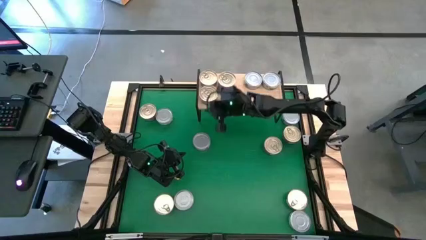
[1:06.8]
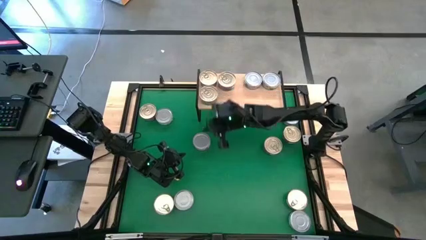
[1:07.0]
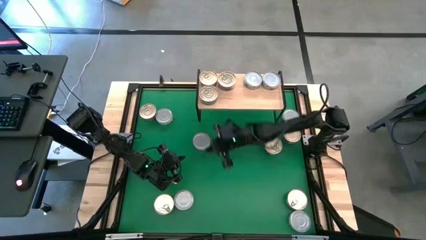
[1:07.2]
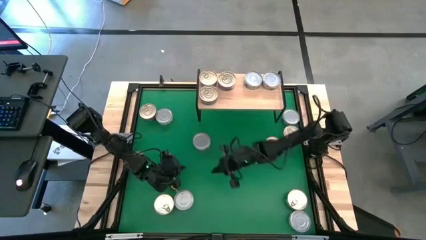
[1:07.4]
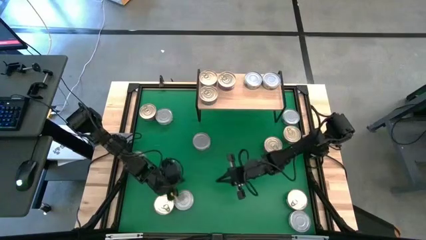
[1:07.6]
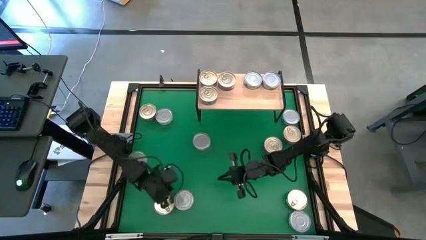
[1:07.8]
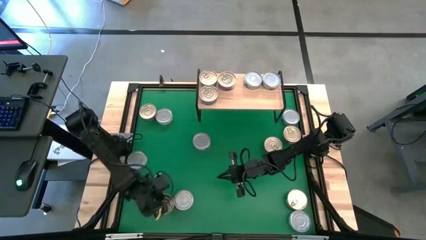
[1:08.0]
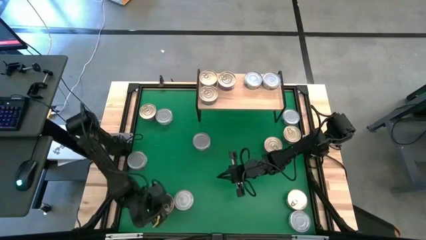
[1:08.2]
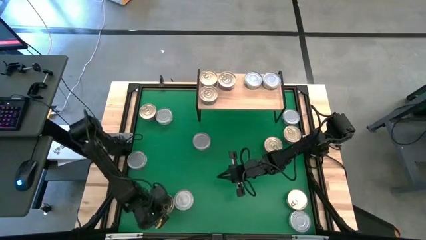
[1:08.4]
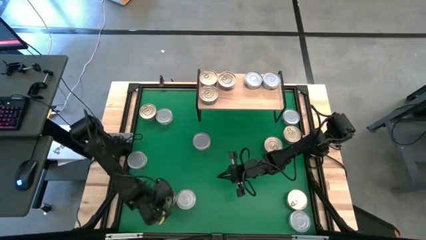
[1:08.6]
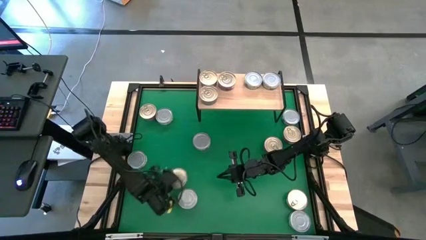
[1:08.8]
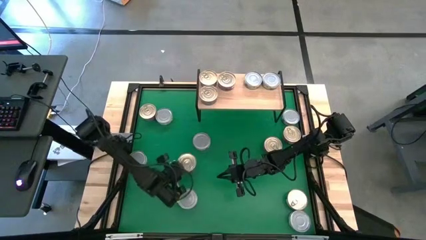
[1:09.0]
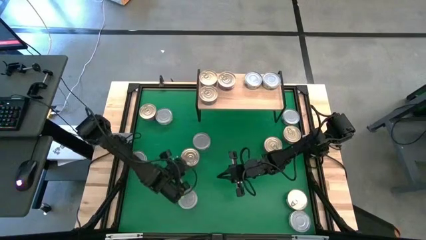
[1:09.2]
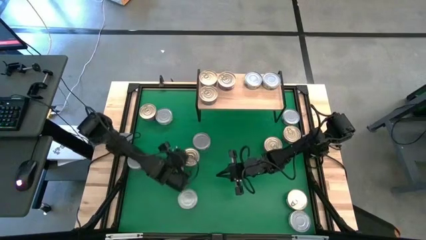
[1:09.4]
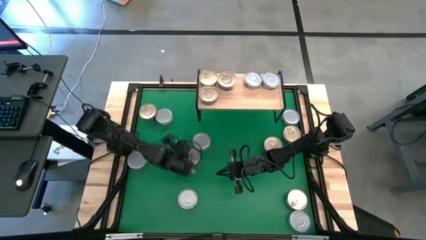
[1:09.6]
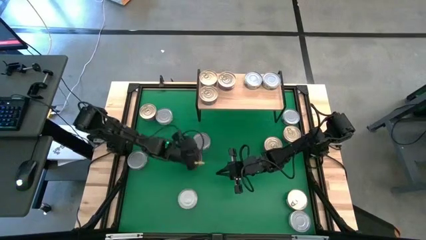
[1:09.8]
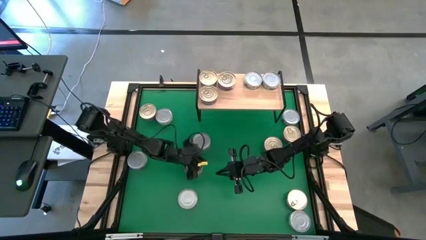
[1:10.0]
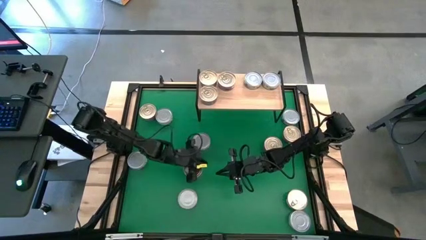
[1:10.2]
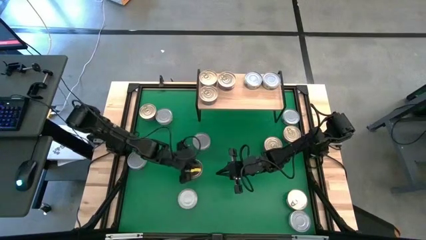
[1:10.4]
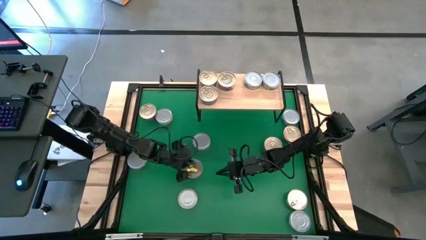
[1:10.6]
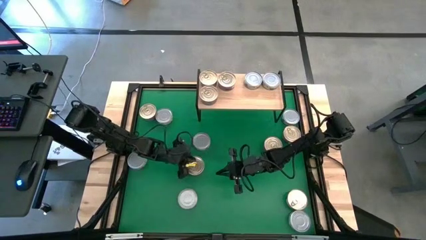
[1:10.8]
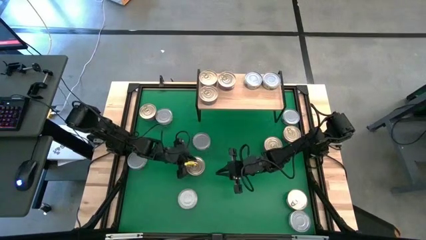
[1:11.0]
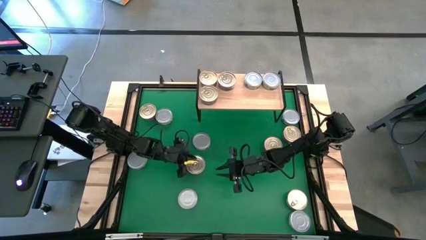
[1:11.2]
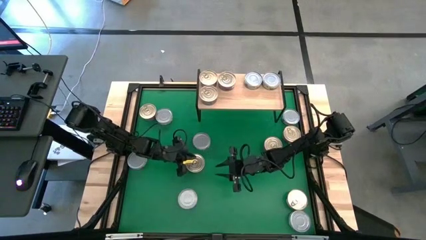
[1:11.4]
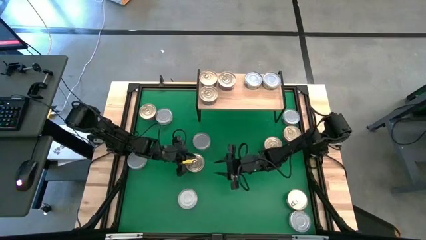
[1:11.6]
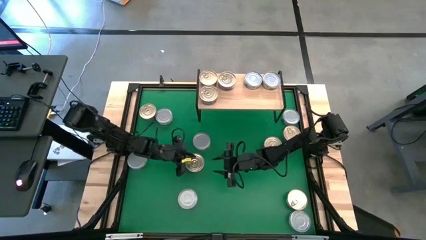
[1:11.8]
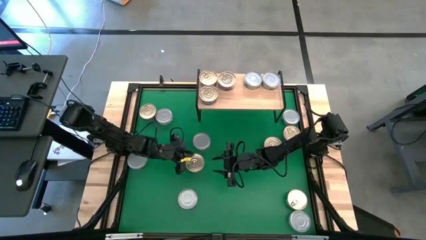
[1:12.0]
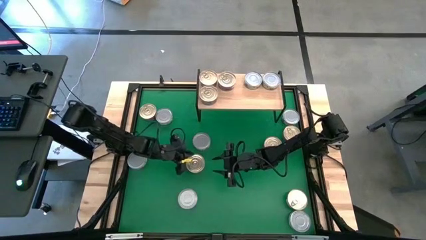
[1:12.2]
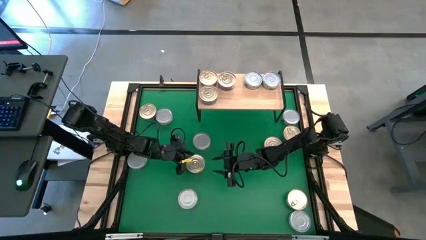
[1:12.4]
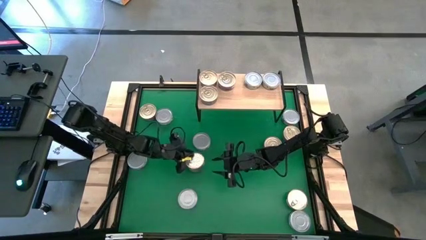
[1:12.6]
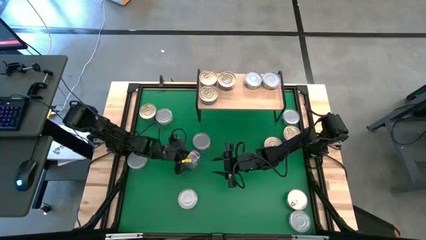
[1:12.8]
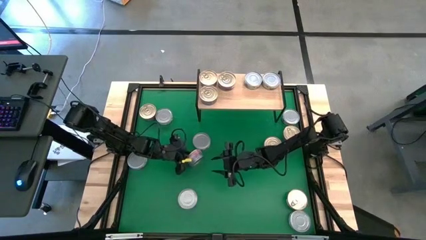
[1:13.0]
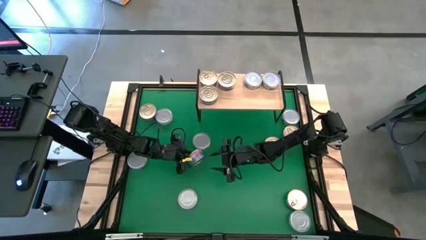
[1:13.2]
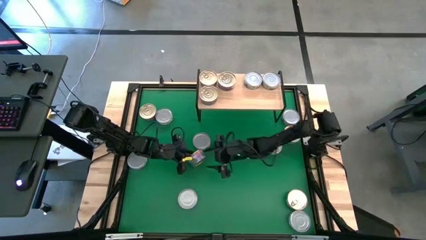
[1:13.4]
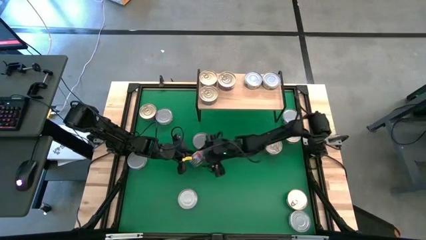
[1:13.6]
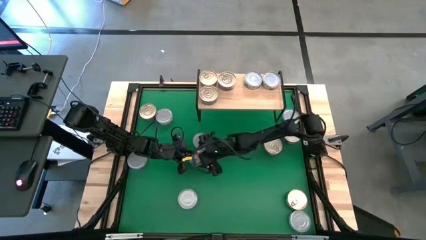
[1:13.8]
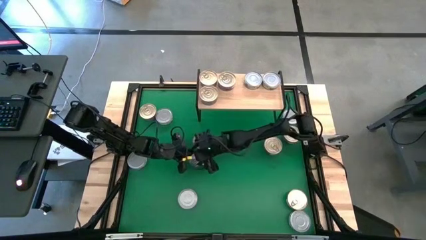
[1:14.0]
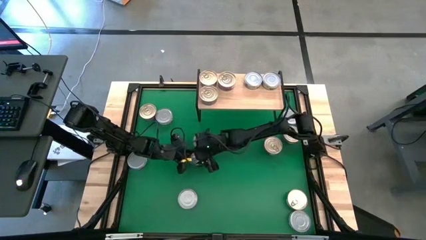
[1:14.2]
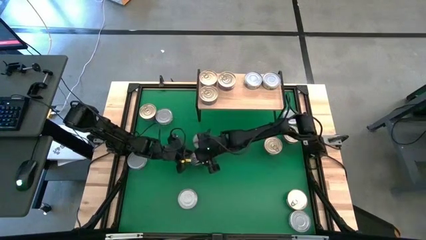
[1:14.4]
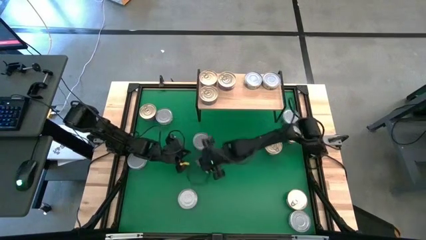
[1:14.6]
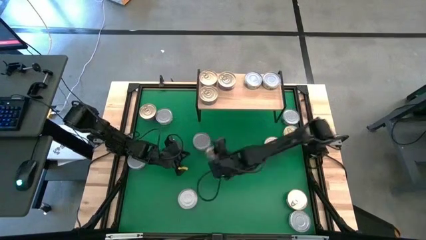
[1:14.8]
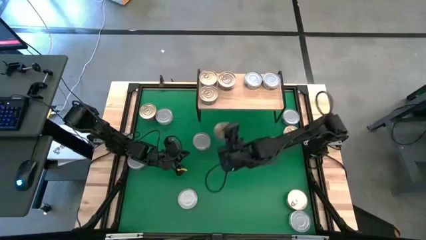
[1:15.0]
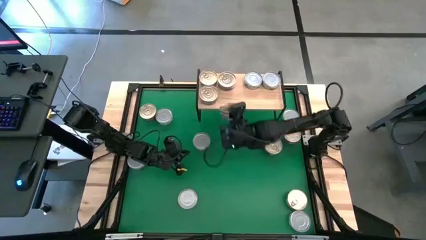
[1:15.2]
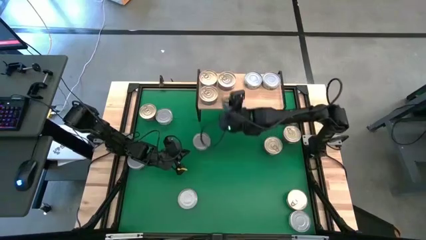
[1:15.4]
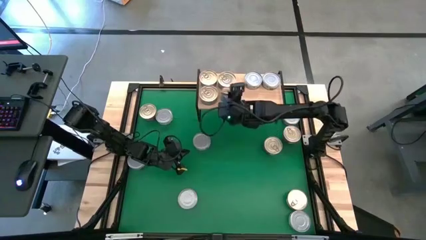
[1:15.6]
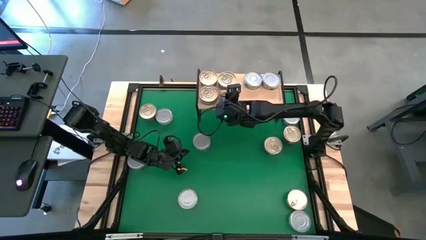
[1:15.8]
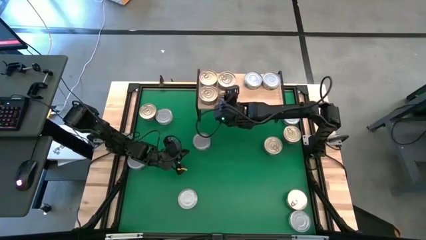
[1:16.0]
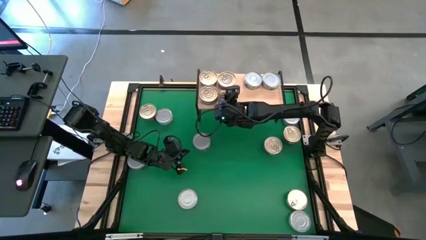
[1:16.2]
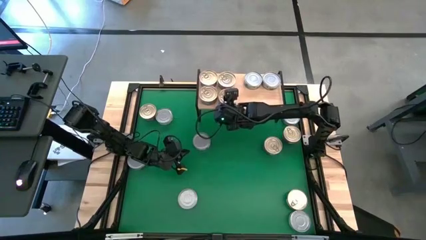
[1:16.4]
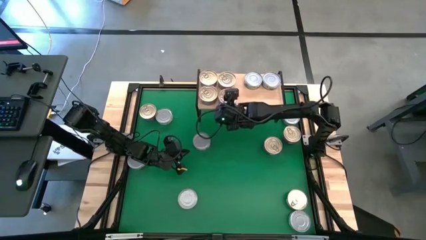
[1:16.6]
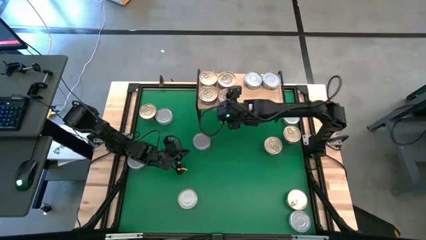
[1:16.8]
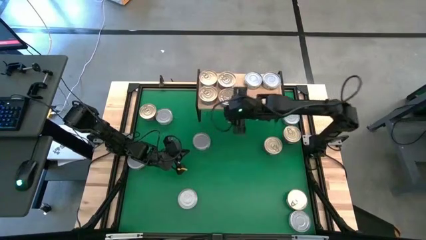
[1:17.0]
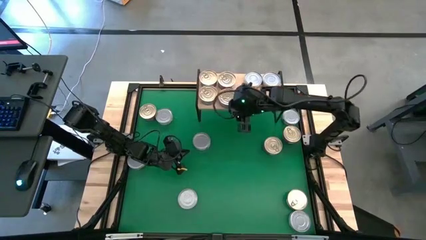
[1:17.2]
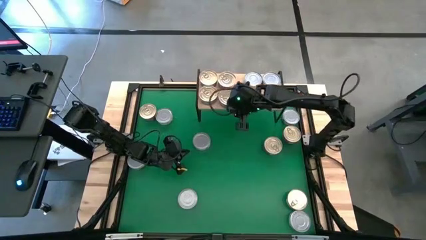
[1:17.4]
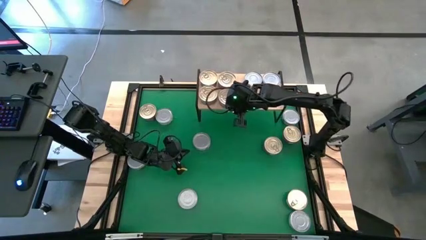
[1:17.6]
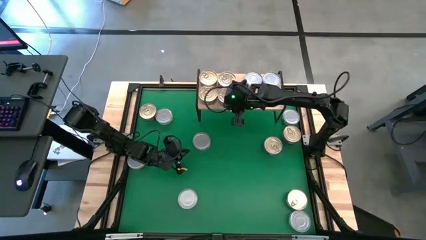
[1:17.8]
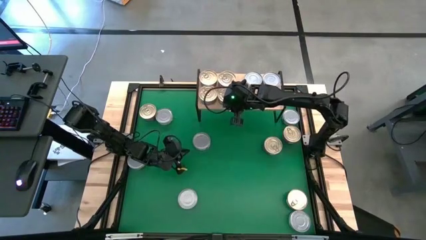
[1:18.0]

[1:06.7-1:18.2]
Task: Stack canned seafood by type on shelf
Put the blue pink tuna can on the shelf

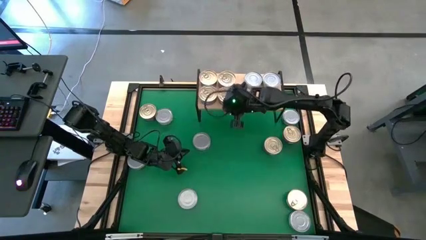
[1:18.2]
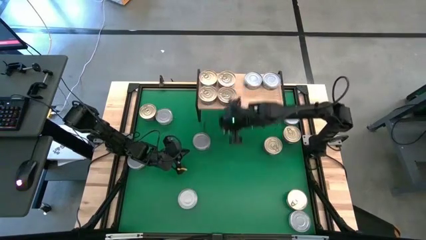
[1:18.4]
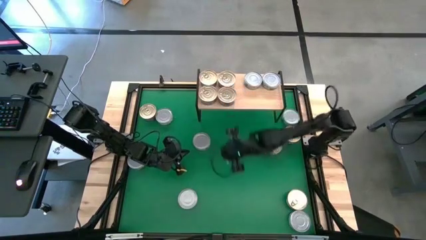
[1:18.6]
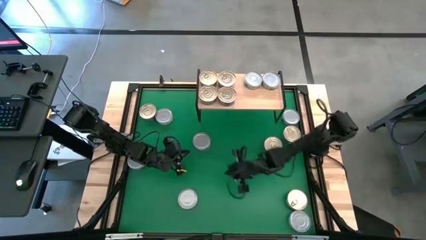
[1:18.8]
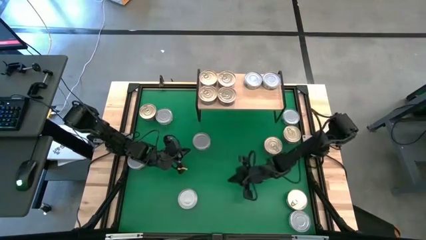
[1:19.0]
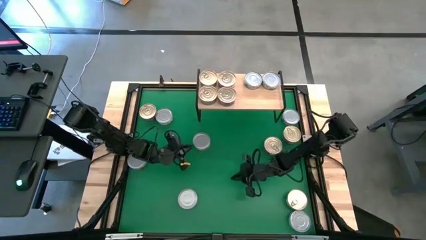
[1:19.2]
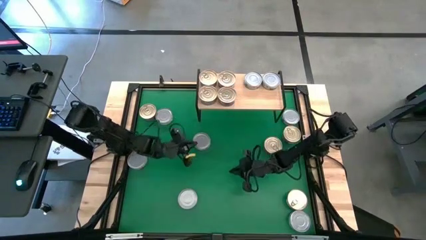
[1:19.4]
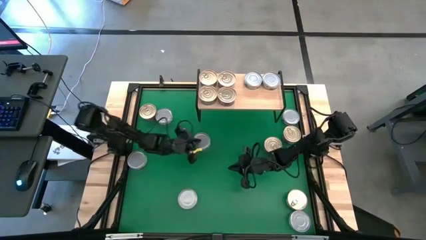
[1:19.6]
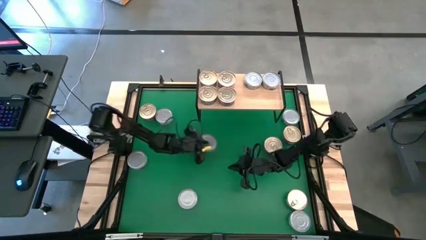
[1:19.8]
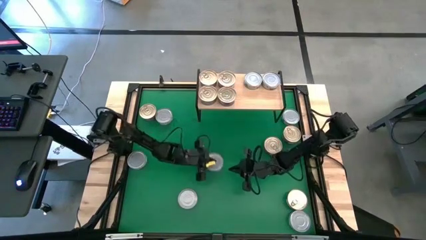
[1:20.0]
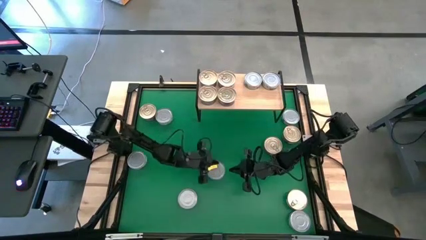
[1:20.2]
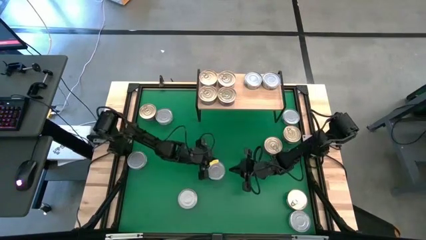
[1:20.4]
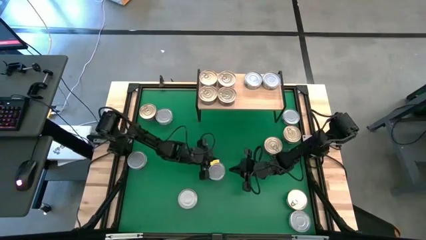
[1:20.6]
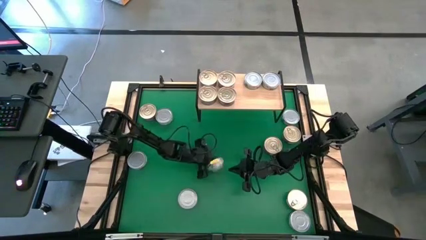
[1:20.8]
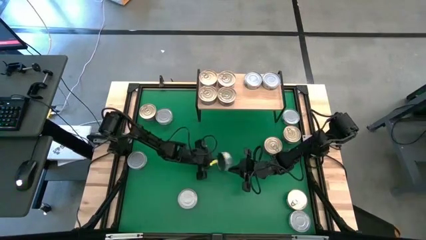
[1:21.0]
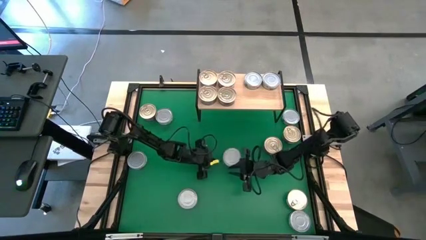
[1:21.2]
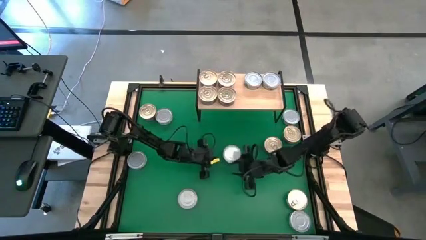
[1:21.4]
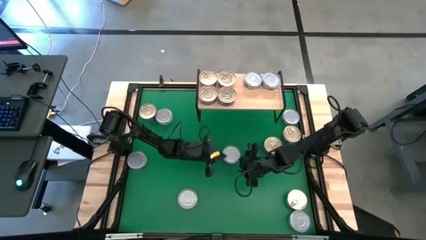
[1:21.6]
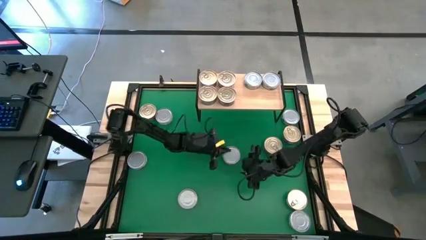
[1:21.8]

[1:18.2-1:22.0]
Put the green tuna can on the shelf

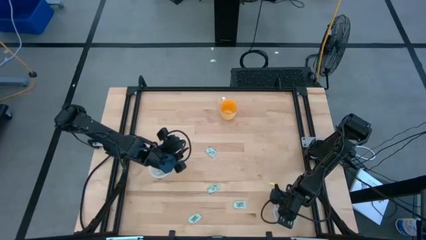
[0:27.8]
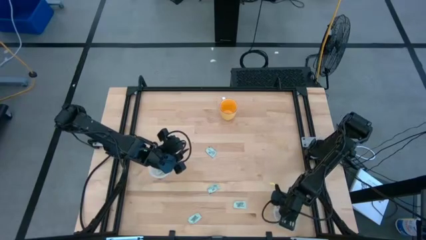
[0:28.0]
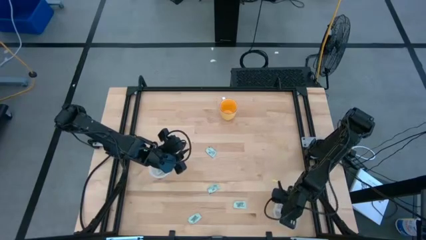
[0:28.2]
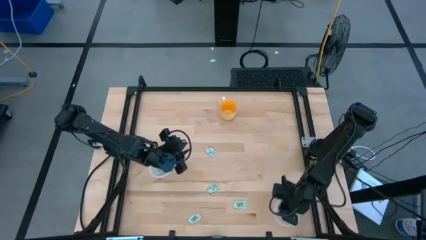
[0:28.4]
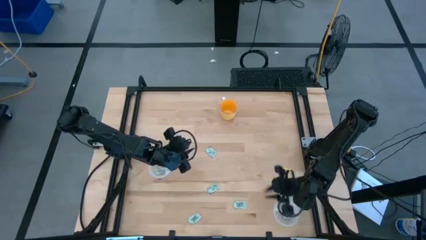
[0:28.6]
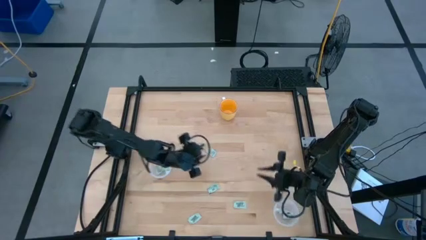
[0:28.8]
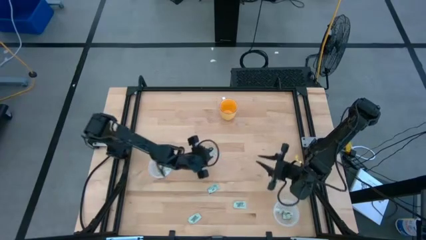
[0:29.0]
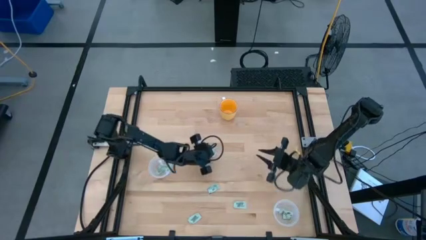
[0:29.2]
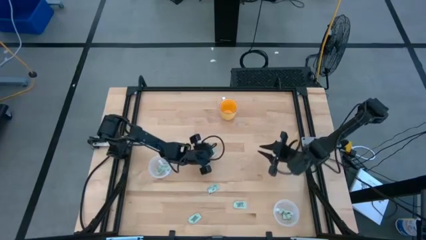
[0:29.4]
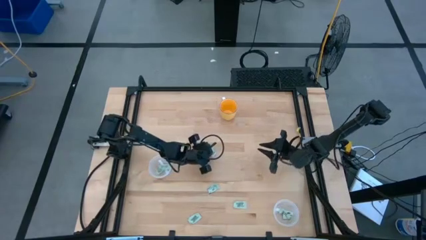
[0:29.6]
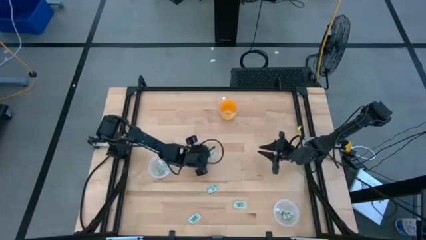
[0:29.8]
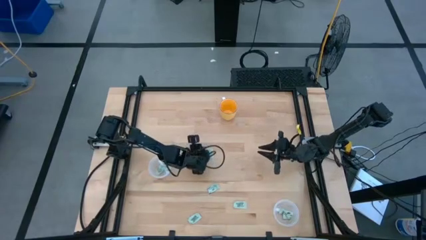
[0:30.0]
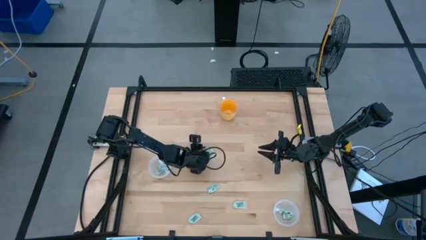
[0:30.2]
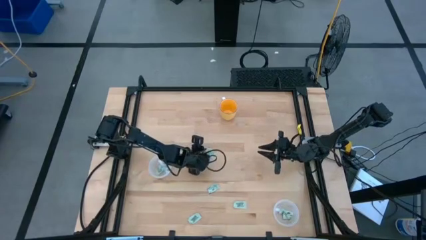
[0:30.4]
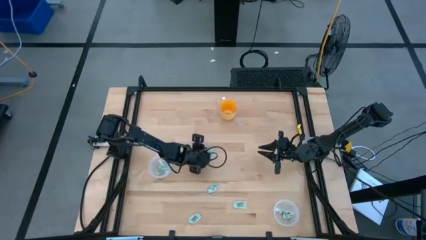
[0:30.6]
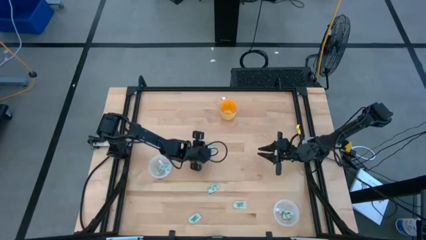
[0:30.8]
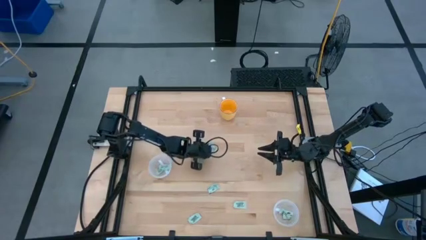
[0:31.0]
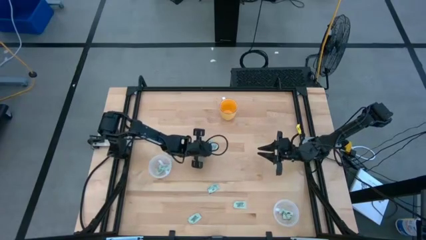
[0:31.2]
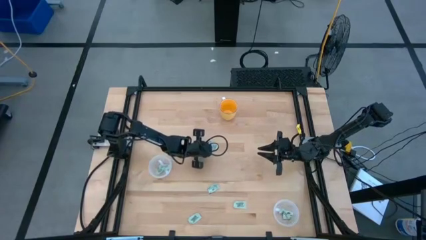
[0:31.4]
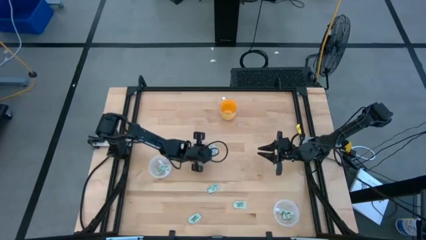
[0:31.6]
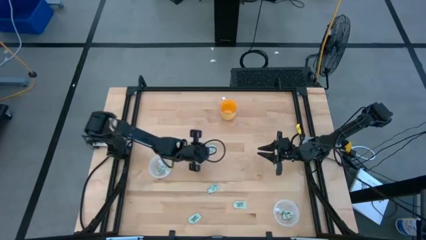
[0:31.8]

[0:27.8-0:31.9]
Task: Pick and place Stevia / Truvia into bins
Put the light green stevia packet into the left transparent container
